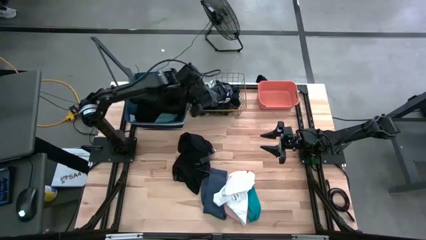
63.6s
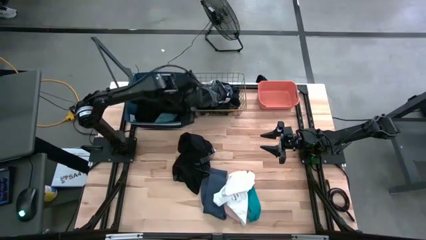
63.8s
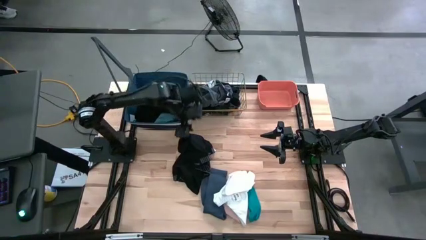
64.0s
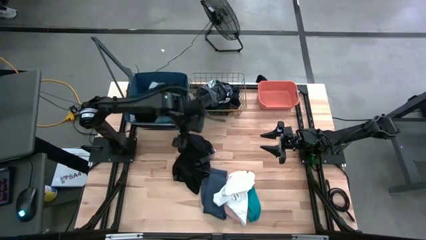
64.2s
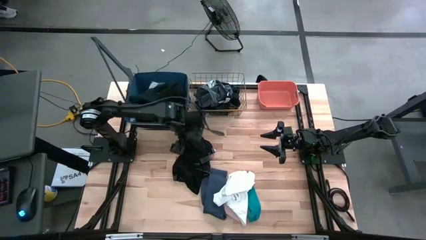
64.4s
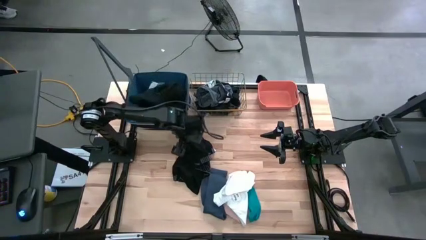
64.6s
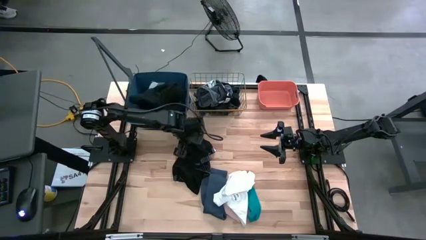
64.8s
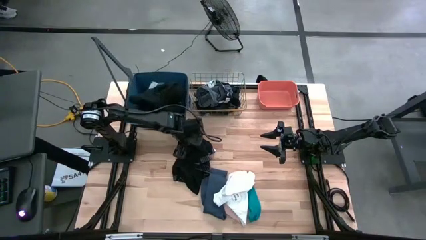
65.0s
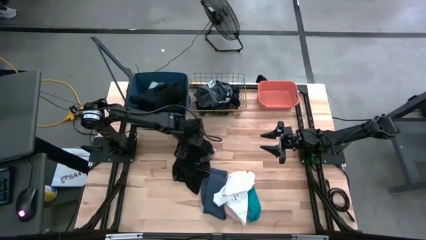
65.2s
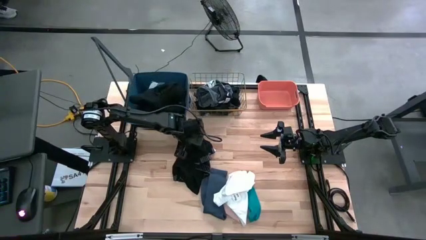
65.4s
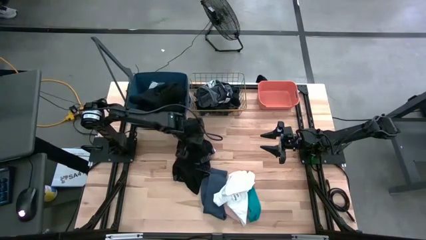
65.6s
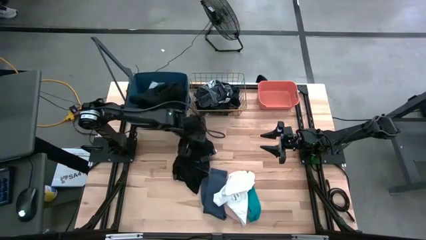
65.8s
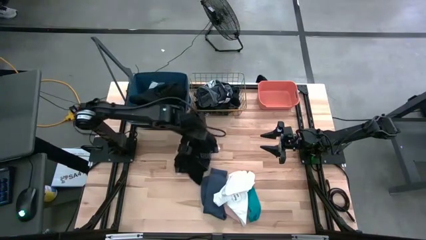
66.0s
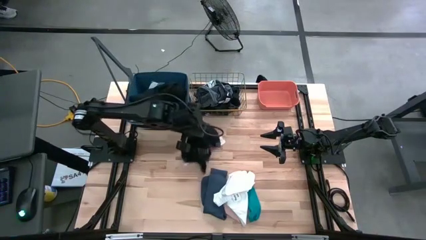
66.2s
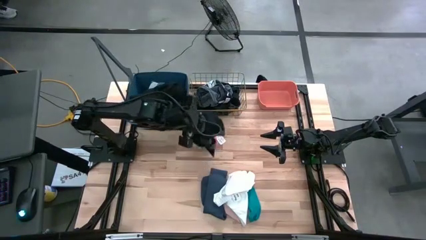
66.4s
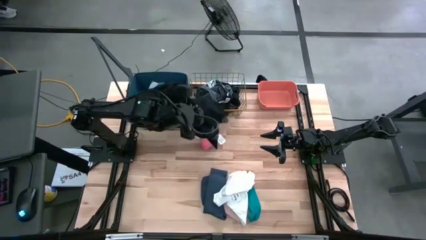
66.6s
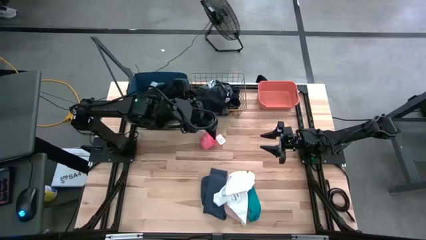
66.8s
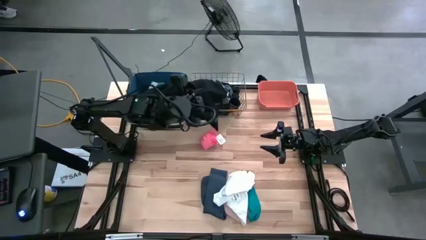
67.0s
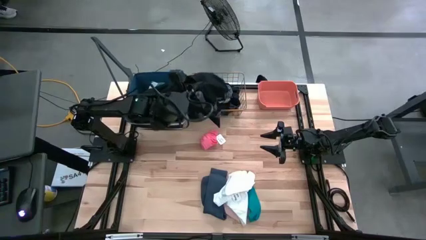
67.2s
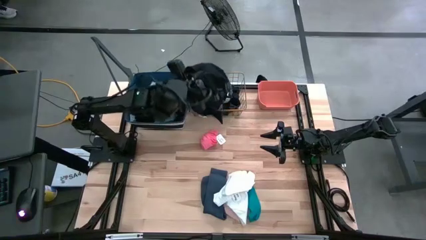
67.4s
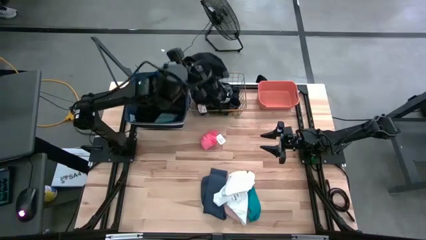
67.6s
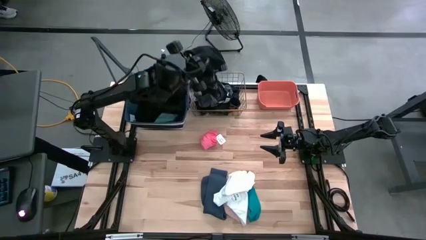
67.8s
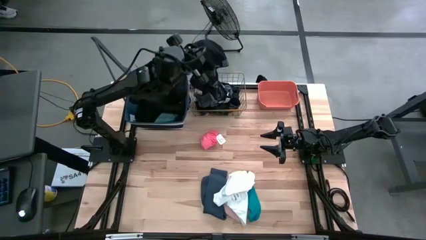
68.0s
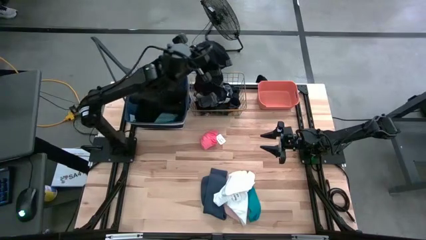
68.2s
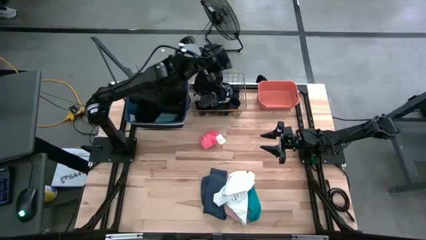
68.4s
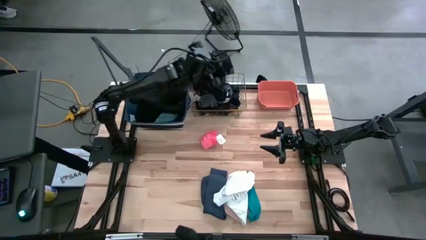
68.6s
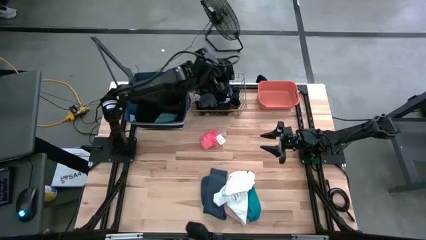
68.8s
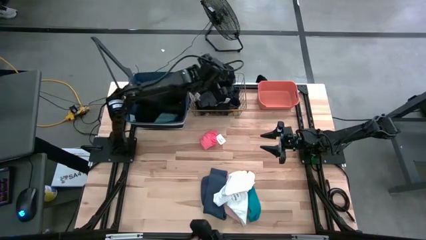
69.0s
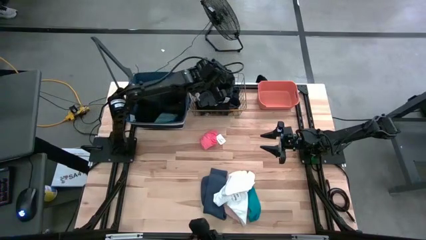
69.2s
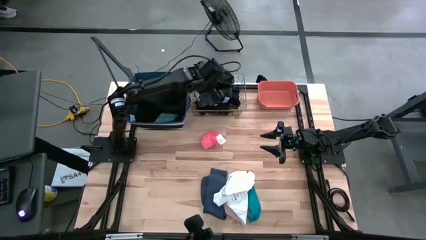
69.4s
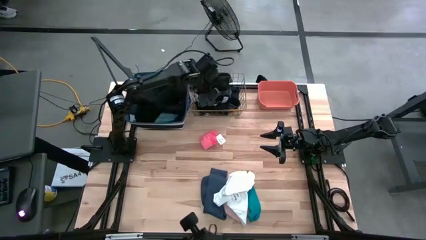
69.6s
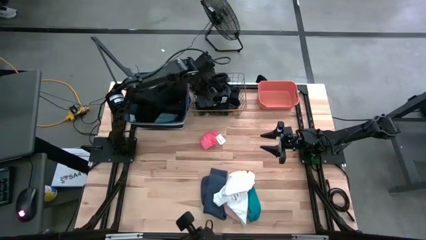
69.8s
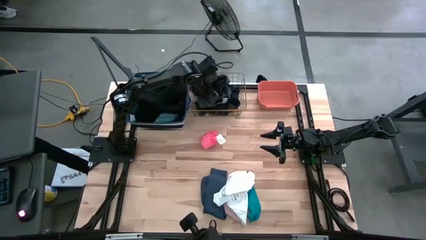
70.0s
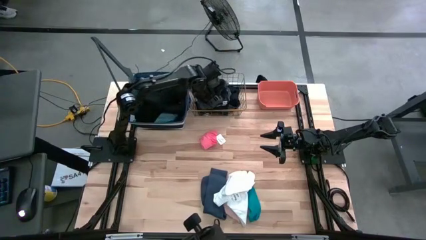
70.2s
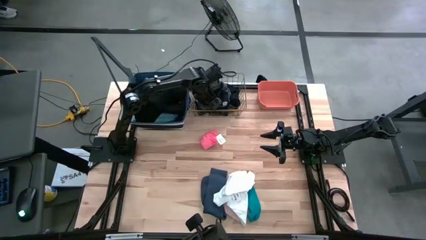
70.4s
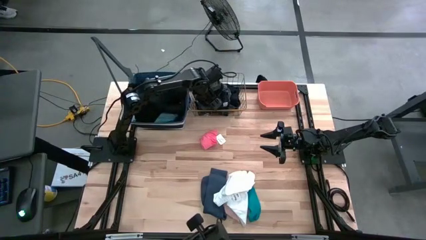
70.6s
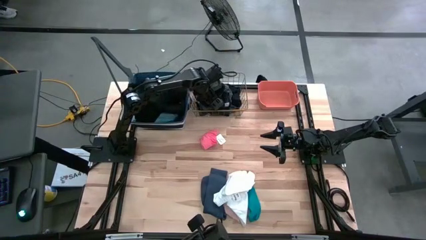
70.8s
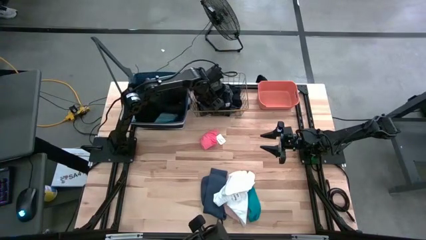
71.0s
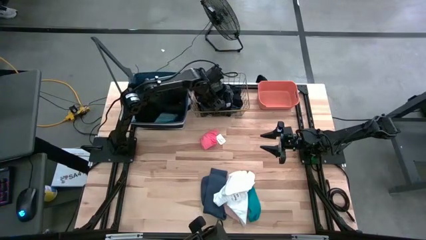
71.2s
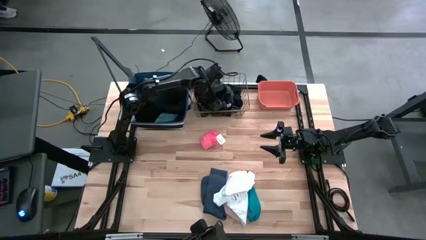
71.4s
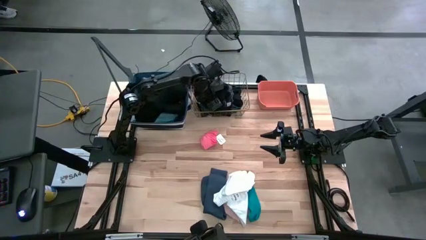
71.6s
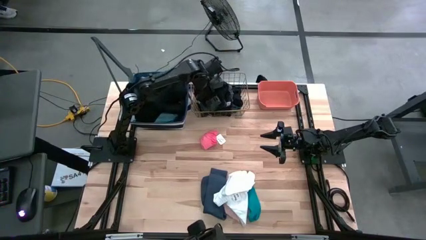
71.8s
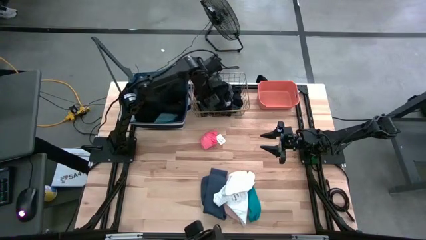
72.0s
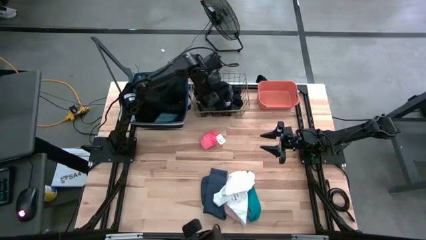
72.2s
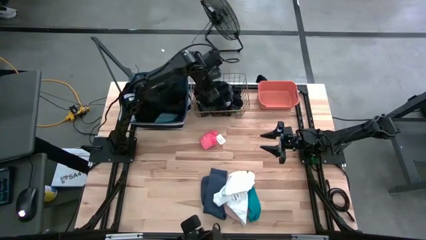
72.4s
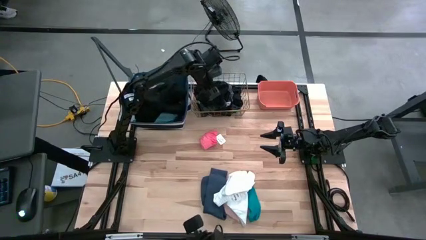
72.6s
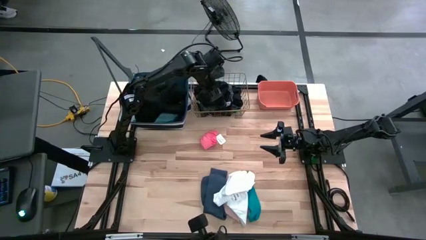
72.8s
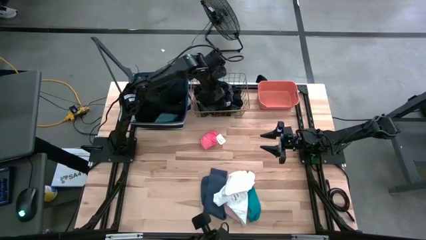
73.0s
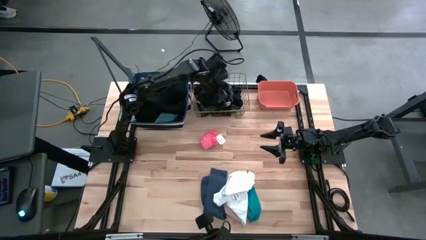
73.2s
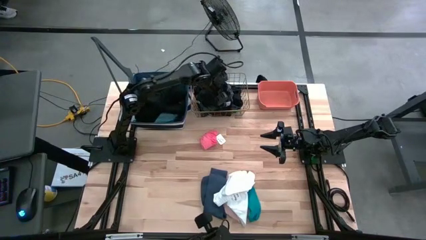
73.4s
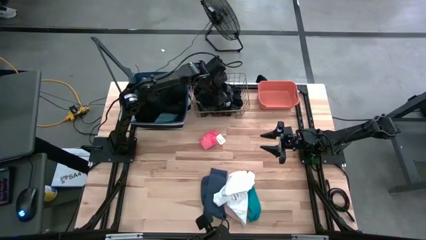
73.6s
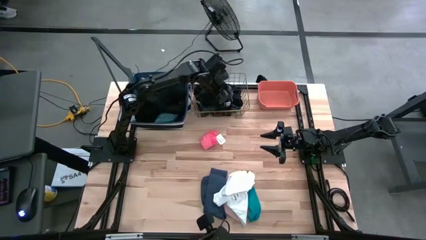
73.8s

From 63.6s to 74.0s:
Task: Pick & Place Cloths
Put the black underwear into the wire basket

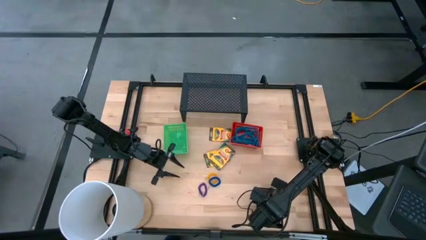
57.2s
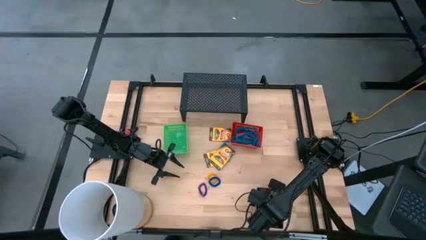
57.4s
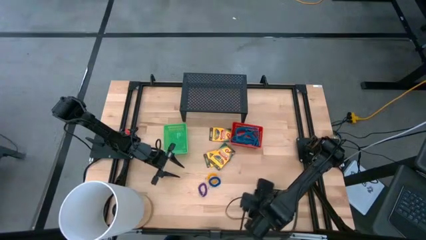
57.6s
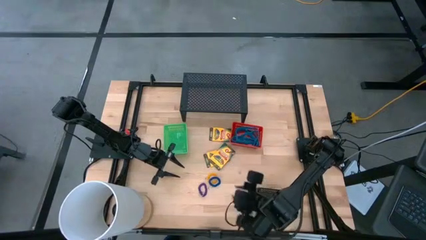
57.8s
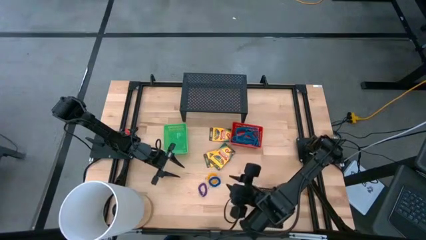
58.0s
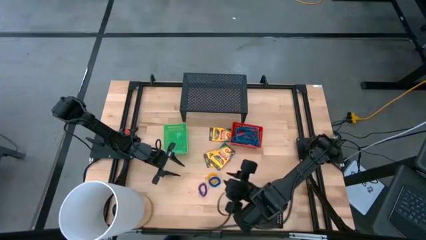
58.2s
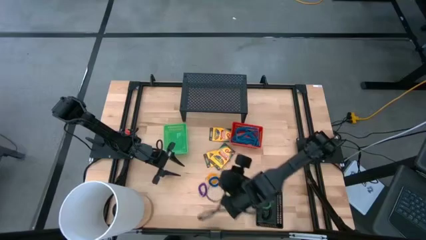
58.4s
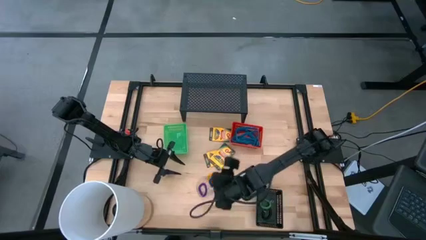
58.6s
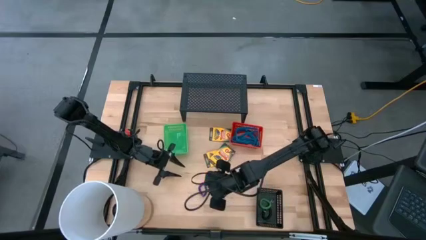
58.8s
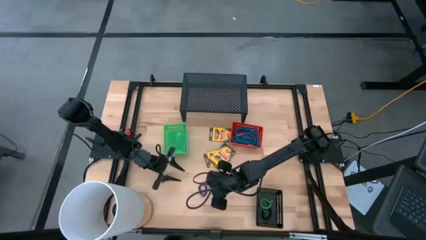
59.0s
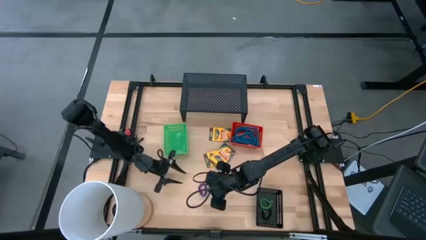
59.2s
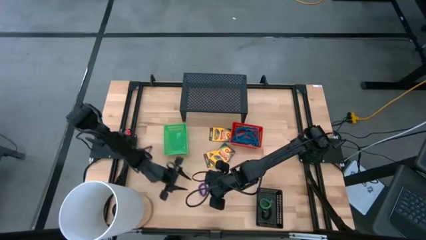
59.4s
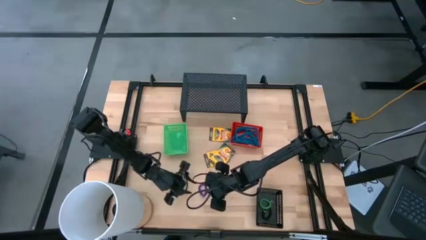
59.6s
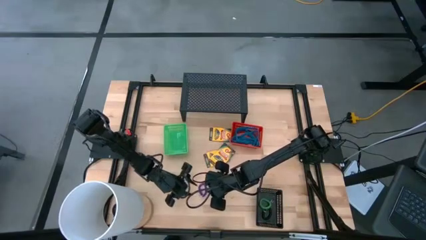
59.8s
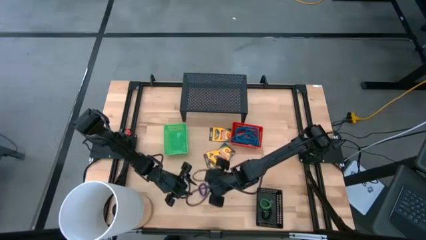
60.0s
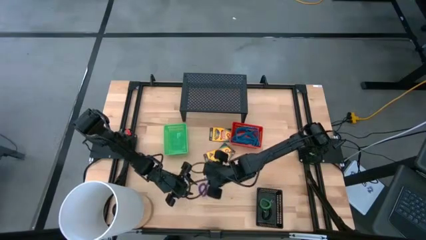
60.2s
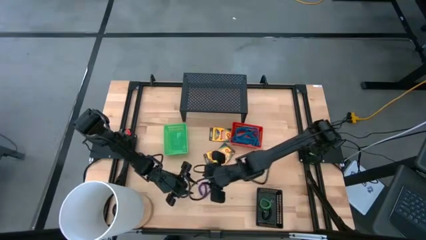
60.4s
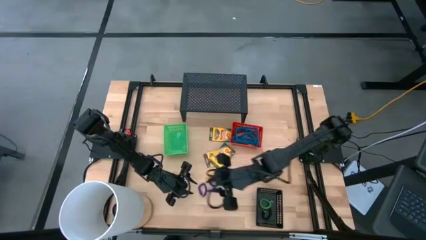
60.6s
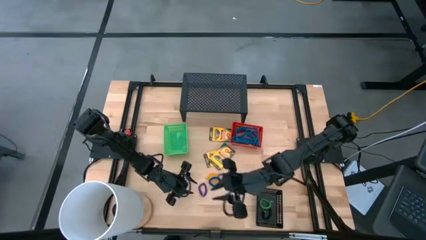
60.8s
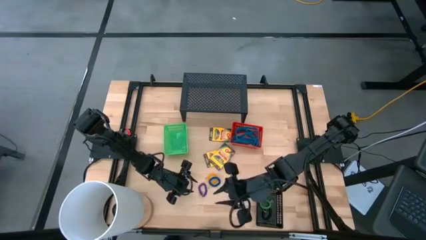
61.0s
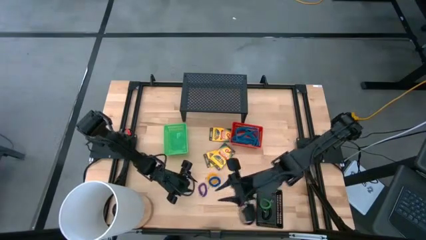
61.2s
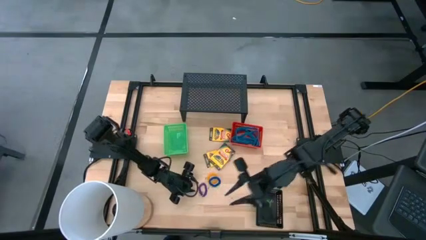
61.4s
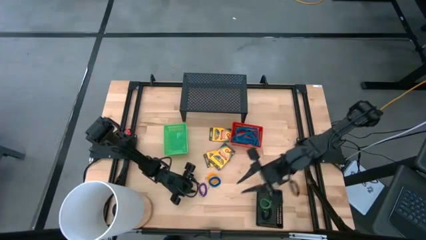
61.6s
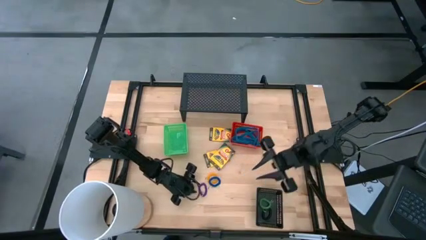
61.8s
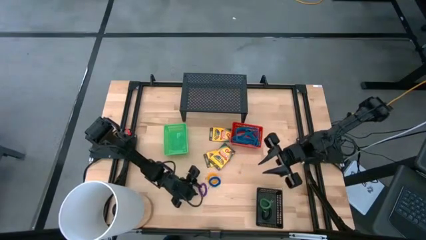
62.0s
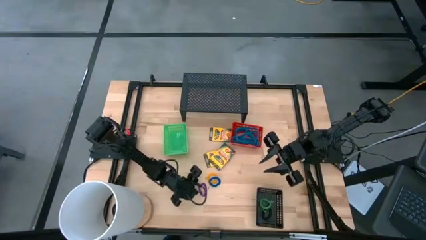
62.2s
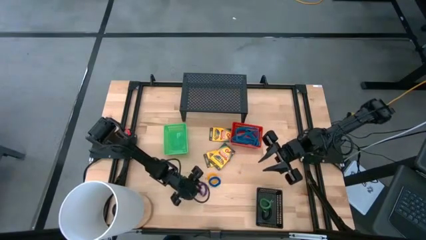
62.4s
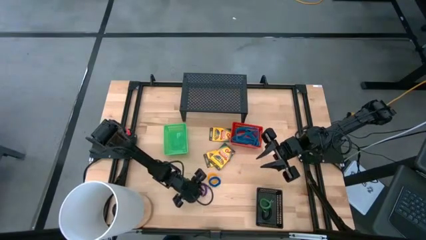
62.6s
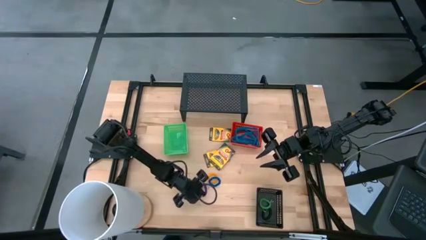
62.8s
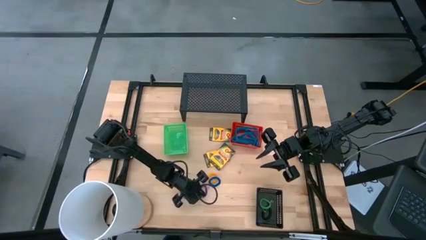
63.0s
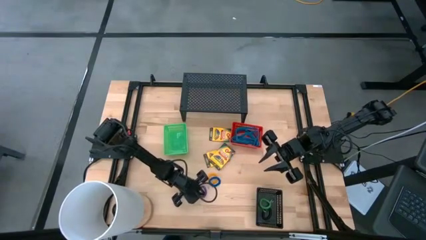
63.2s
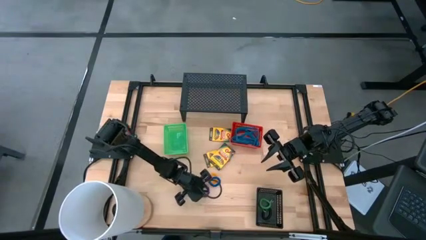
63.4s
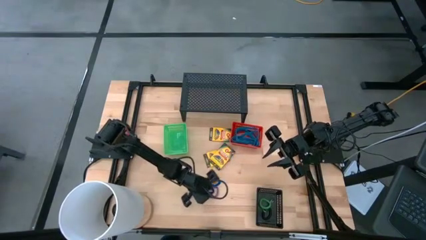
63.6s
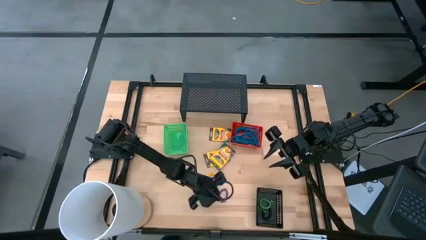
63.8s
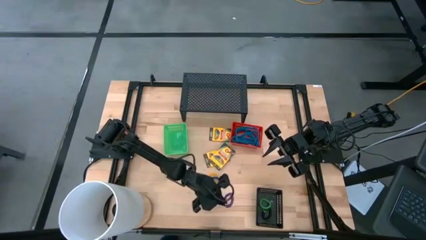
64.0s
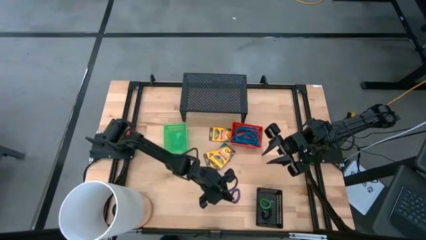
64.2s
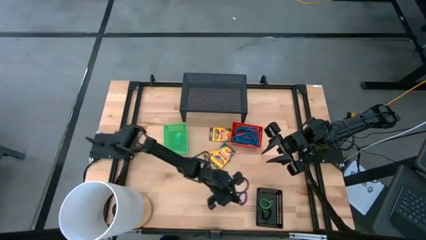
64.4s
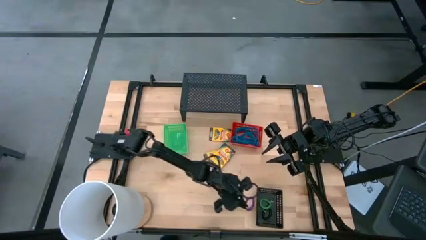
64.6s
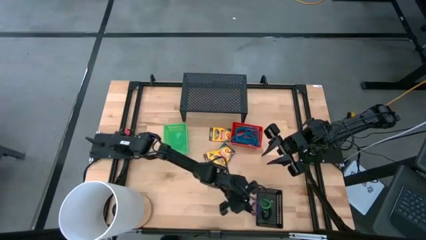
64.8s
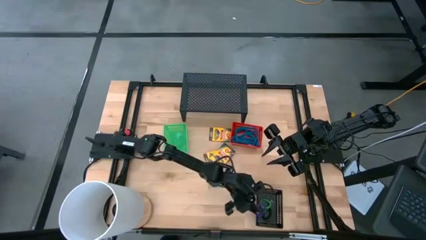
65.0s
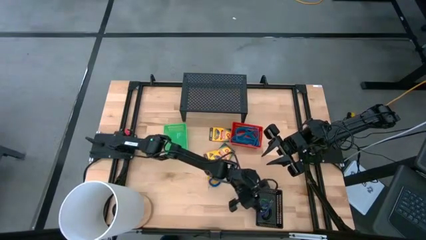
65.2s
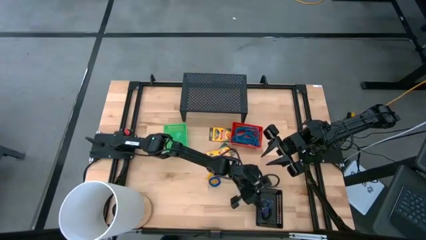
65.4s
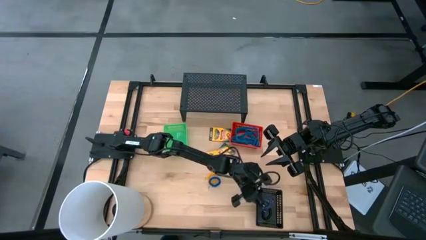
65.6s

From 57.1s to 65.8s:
Task: Pick & Place Office Desk Supplies
Put the violet spring keychain into the black bin
